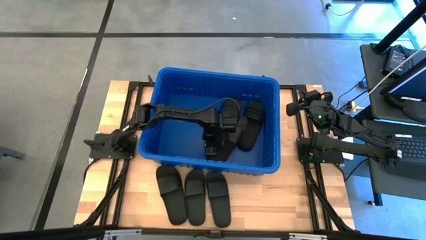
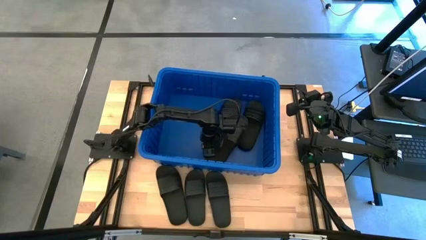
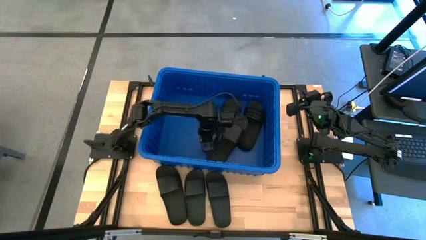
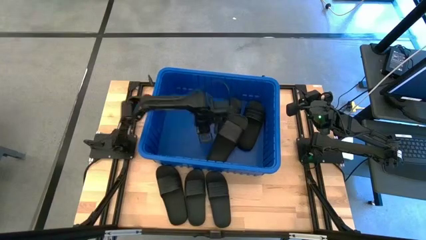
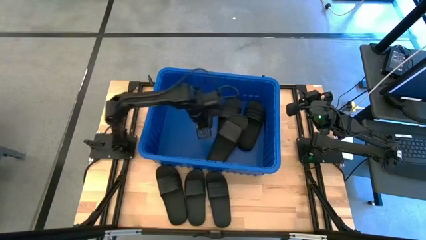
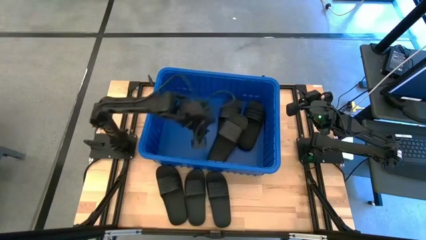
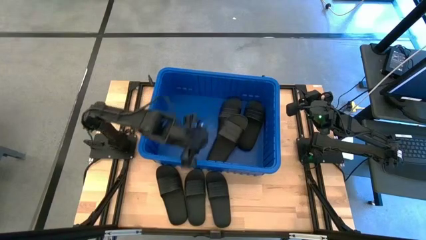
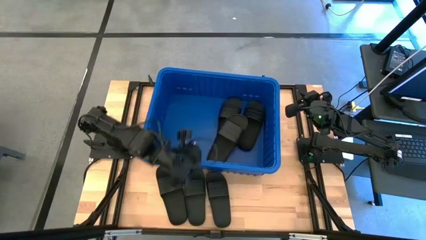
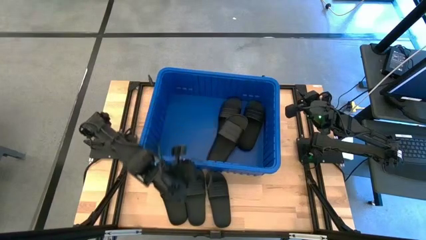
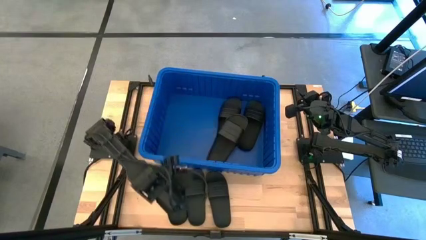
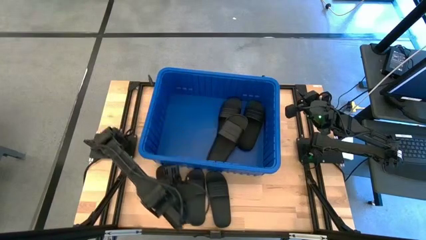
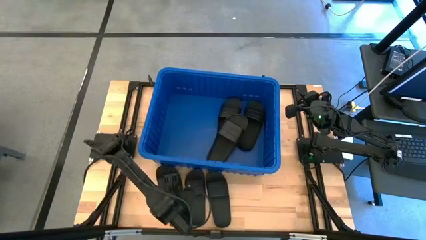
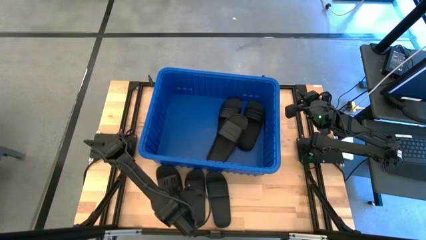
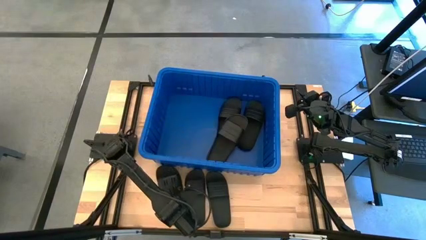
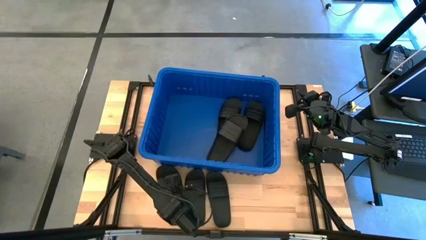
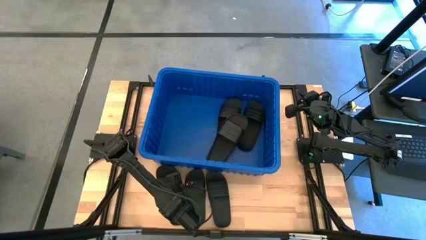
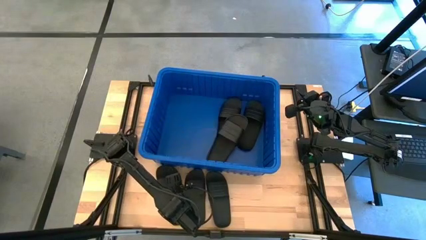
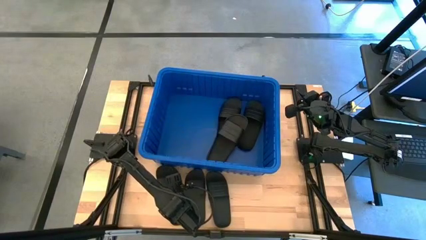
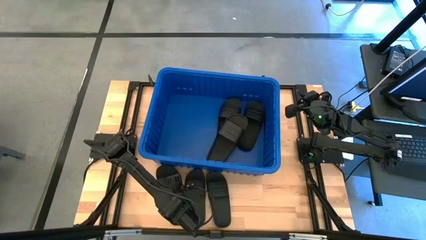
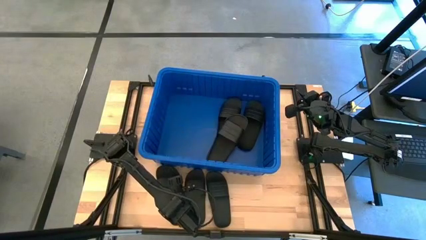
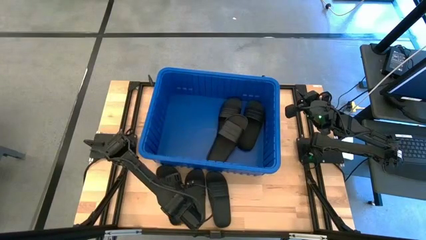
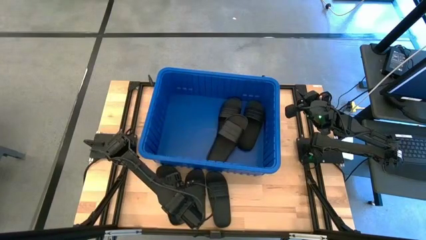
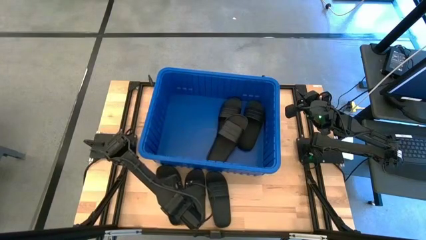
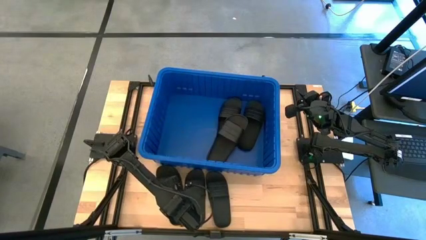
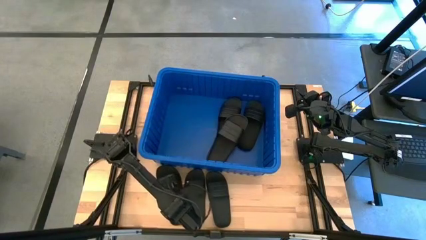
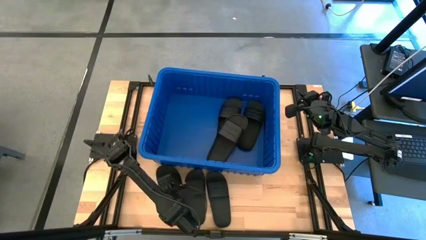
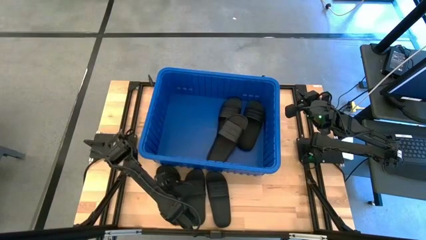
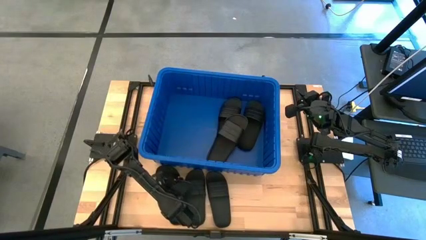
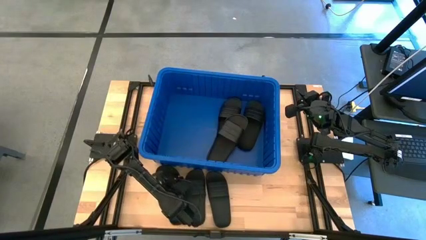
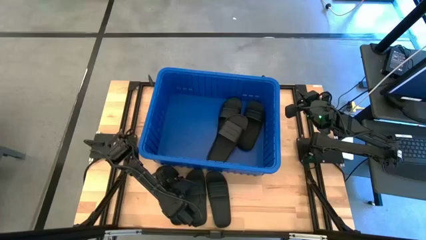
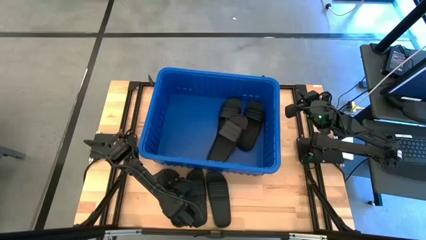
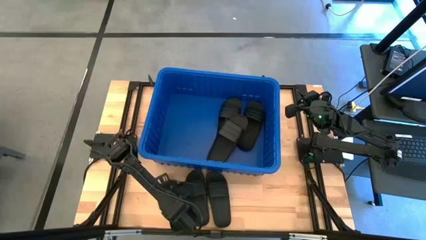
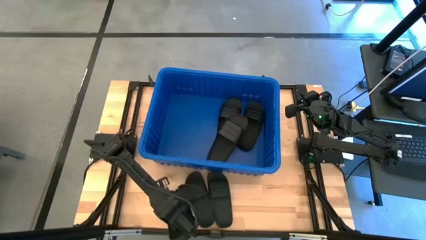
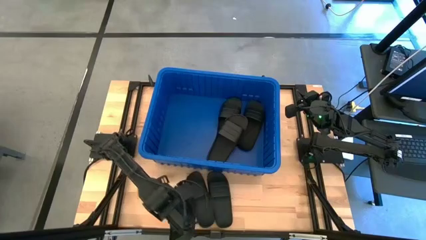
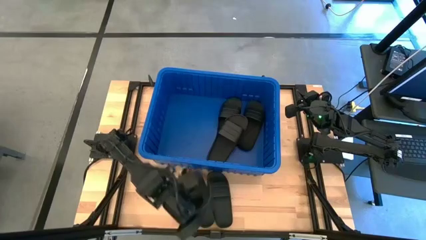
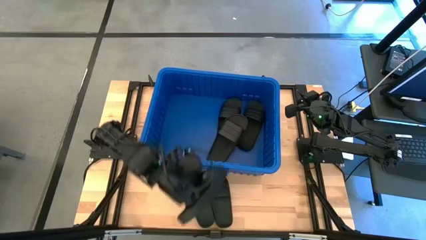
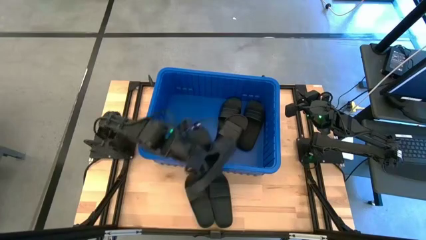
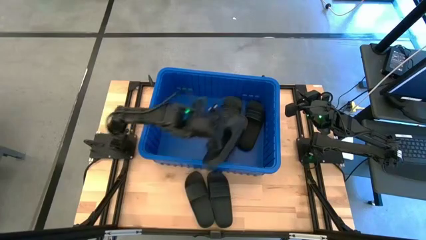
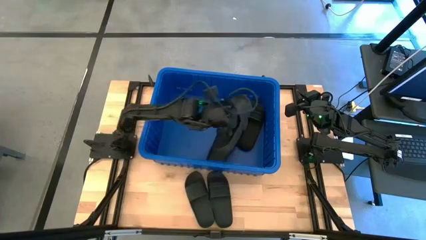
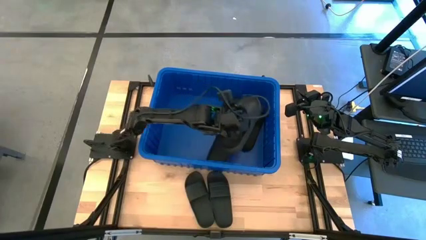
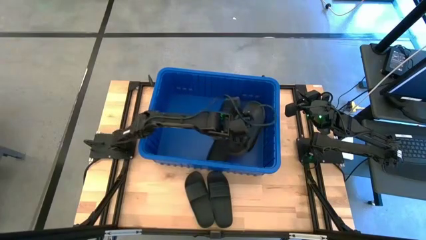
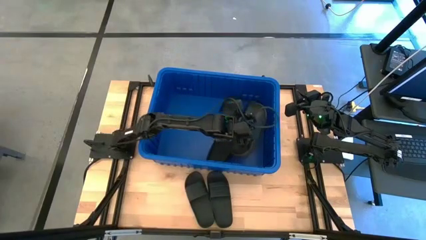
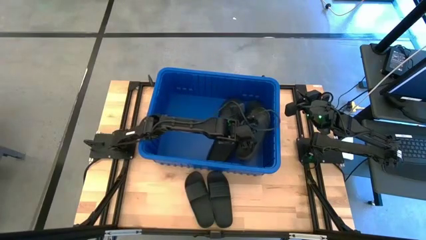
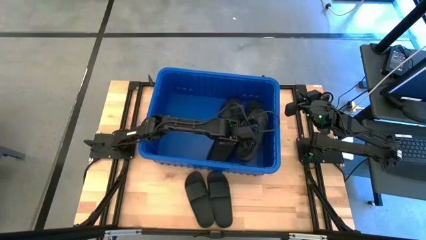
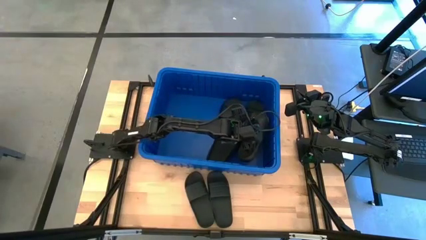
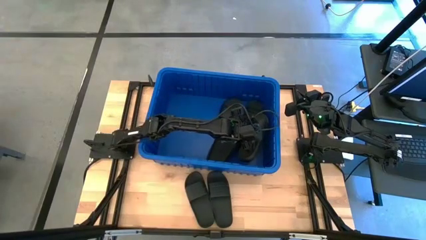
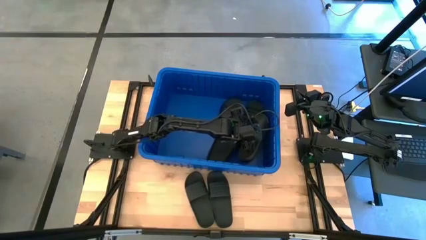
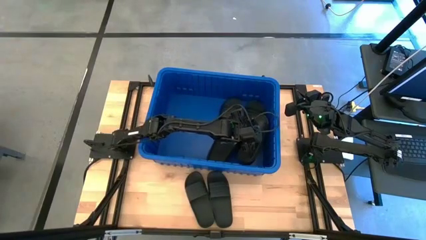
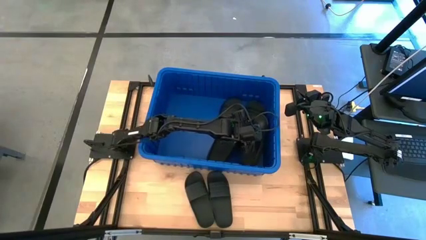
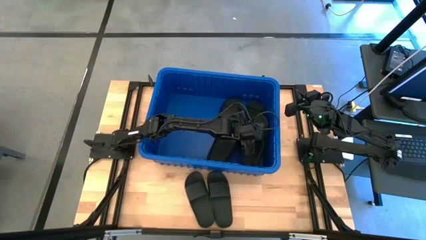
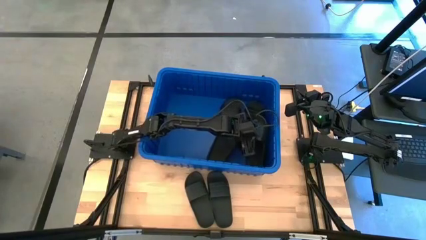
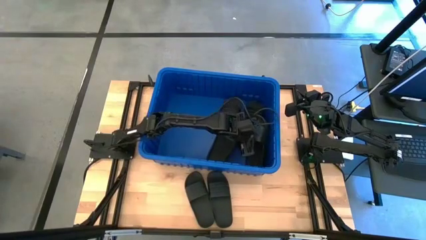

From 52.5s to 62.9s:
Task: Pick and place slides into bin
Put the black slides into the blue organizer bin
